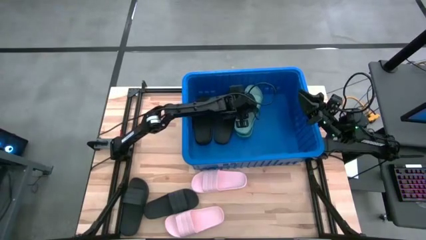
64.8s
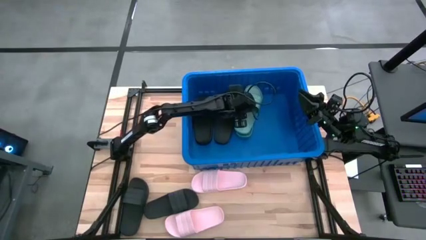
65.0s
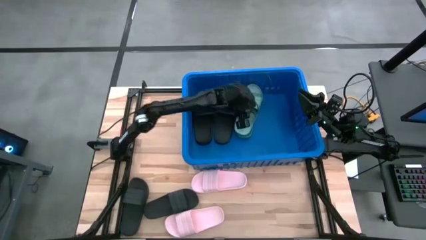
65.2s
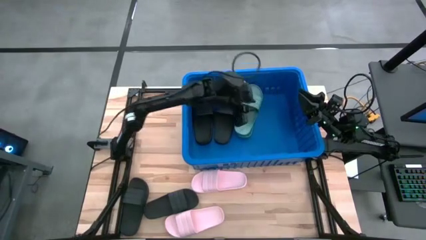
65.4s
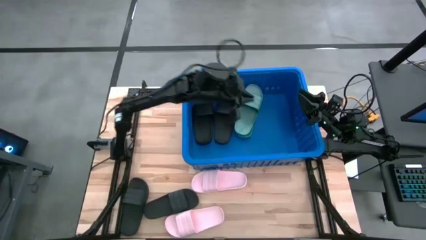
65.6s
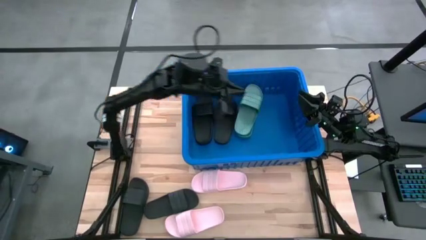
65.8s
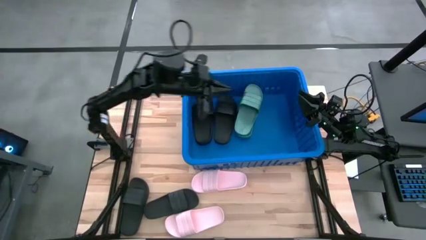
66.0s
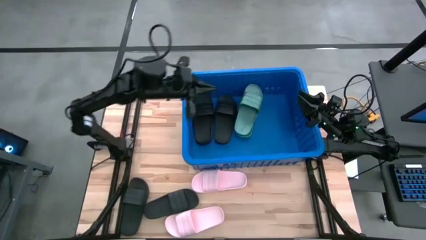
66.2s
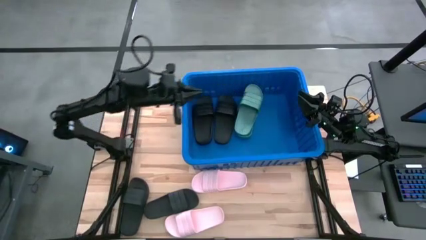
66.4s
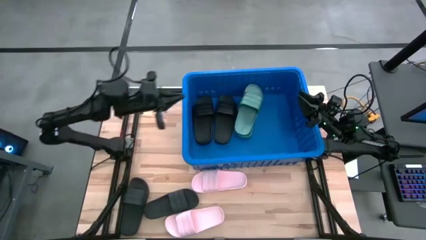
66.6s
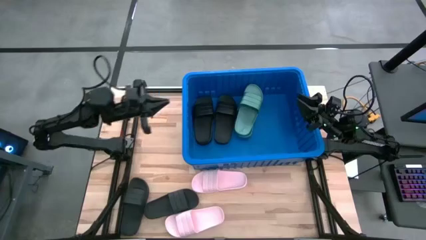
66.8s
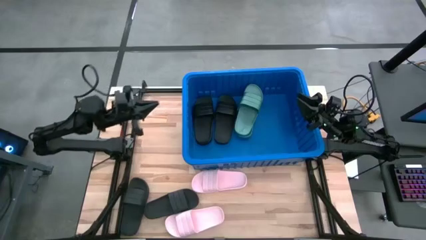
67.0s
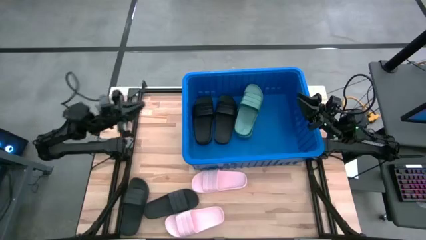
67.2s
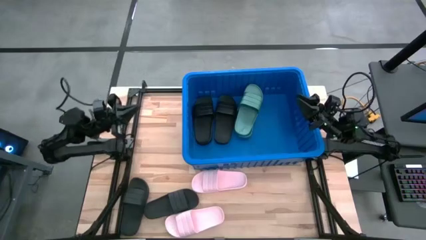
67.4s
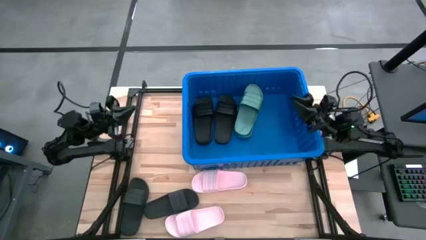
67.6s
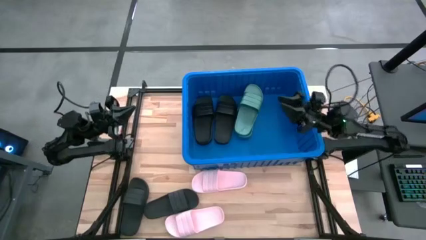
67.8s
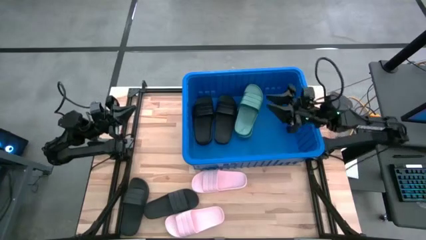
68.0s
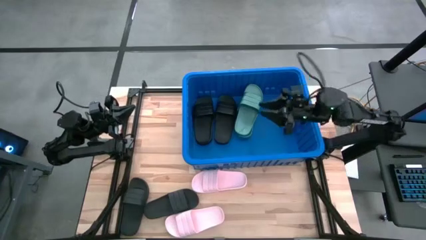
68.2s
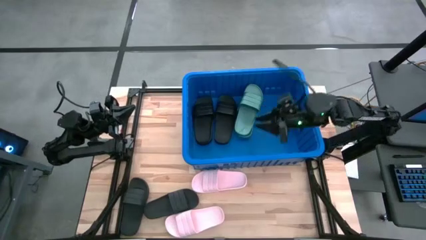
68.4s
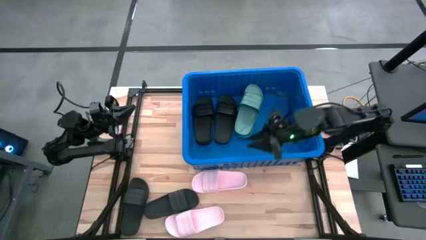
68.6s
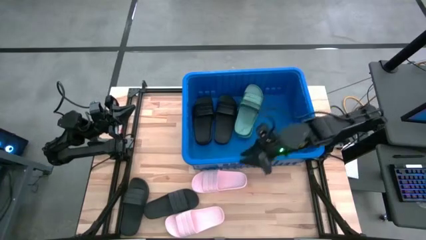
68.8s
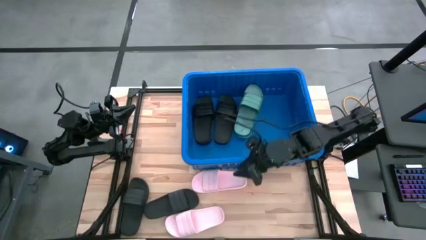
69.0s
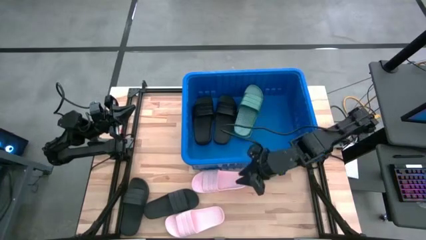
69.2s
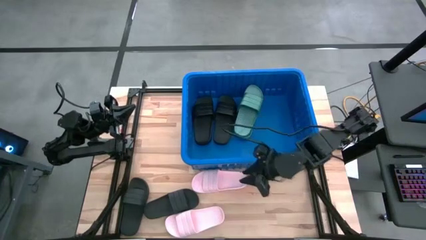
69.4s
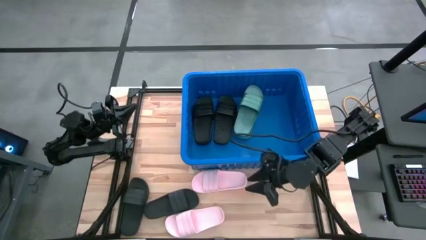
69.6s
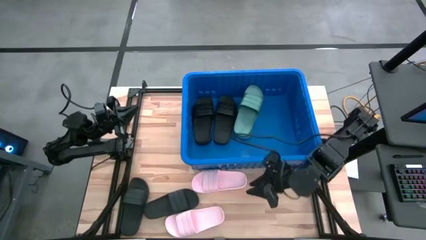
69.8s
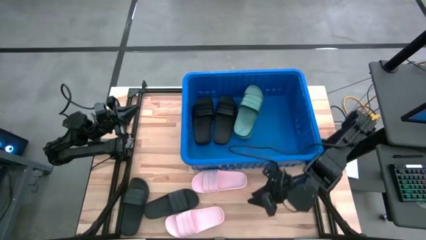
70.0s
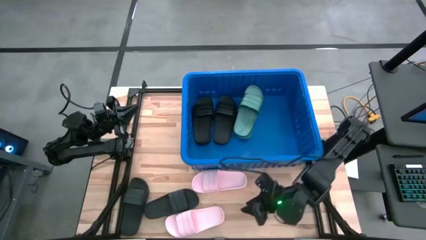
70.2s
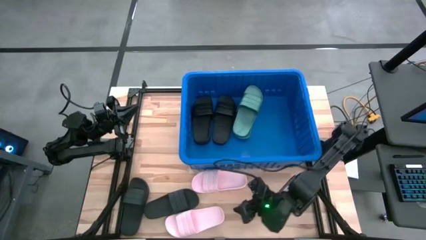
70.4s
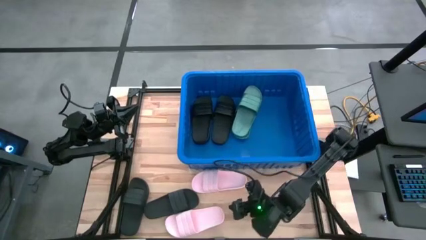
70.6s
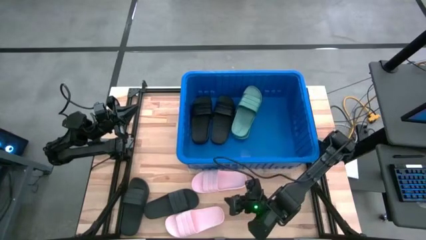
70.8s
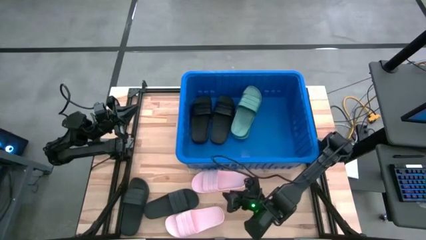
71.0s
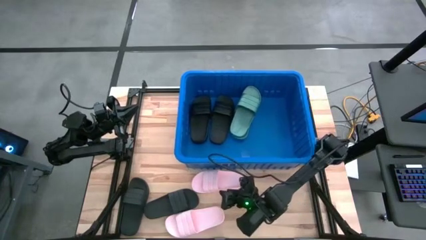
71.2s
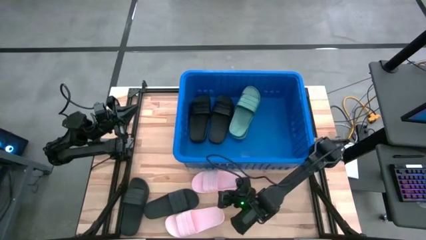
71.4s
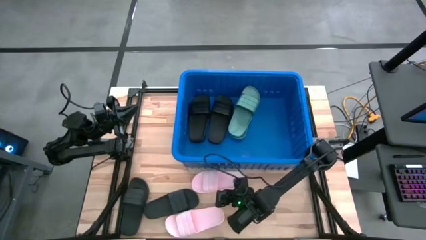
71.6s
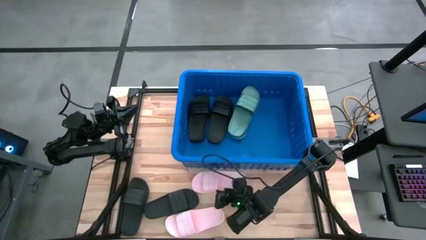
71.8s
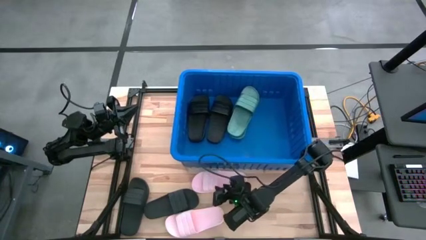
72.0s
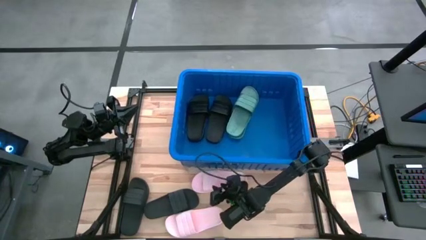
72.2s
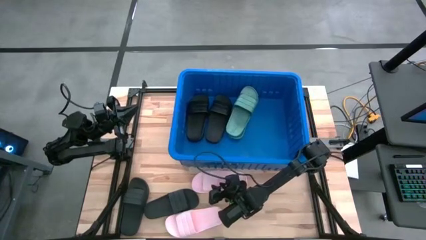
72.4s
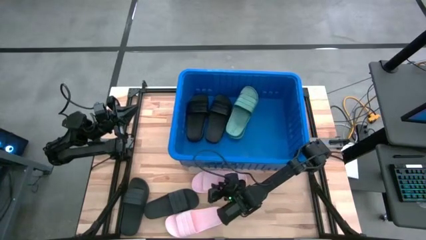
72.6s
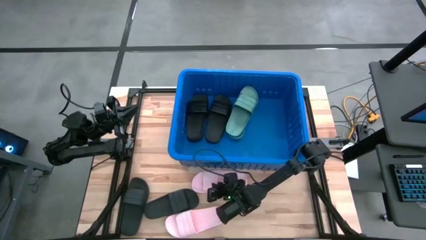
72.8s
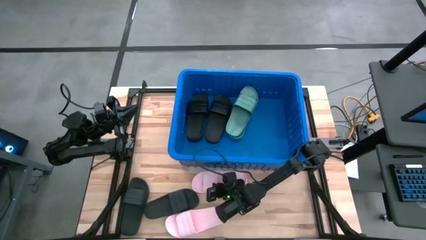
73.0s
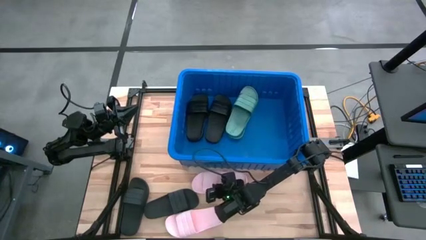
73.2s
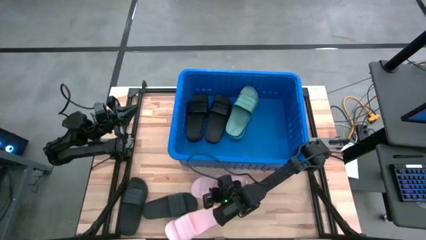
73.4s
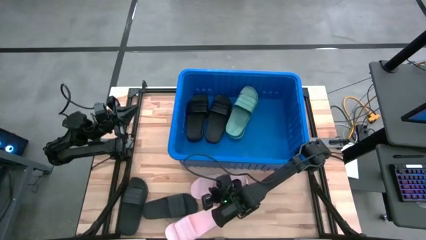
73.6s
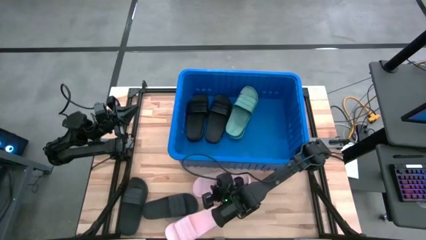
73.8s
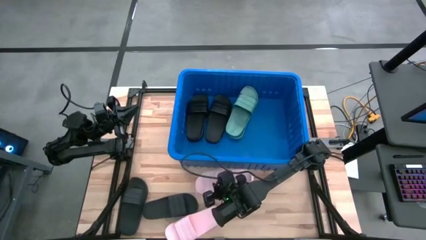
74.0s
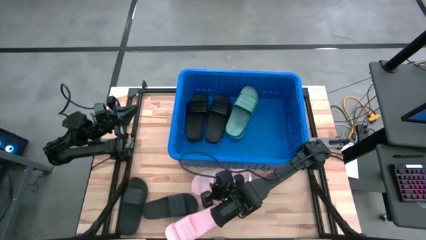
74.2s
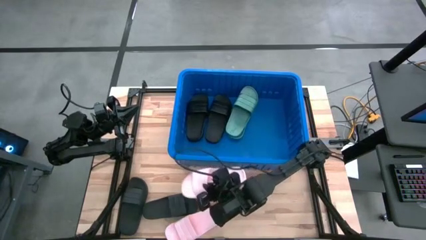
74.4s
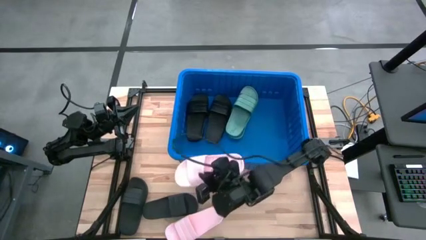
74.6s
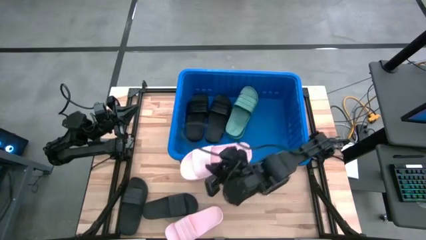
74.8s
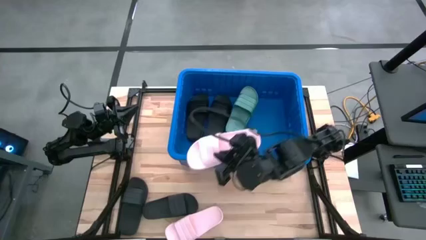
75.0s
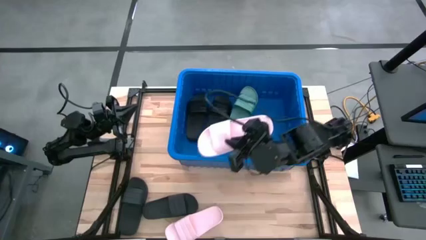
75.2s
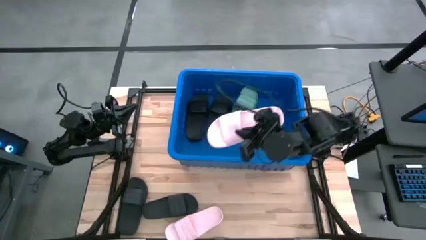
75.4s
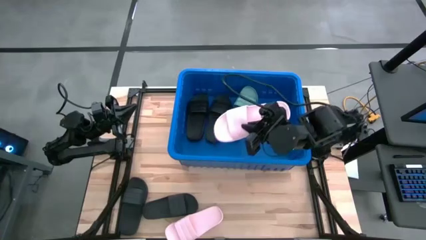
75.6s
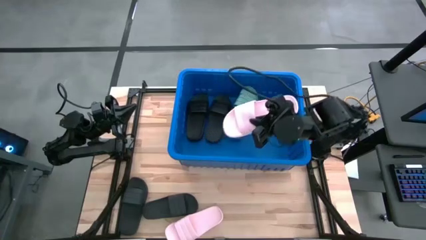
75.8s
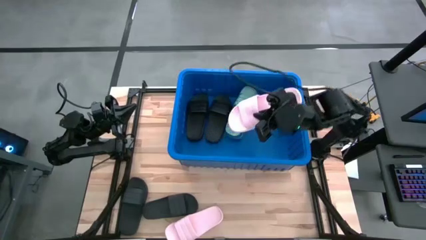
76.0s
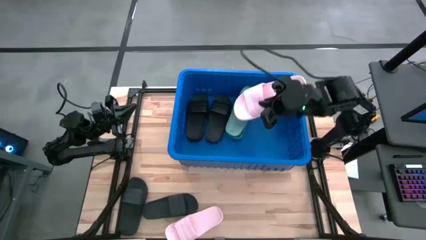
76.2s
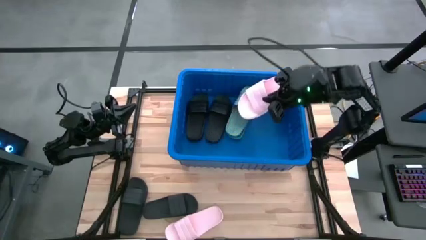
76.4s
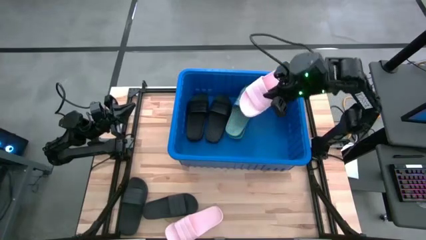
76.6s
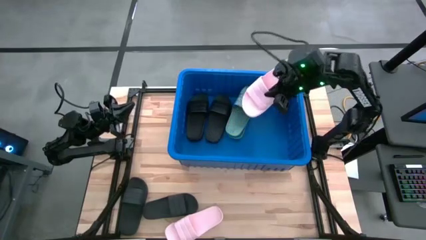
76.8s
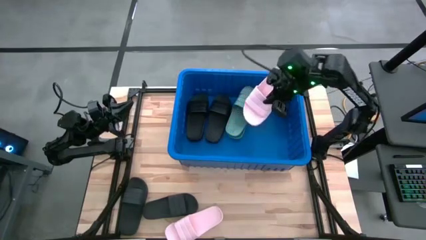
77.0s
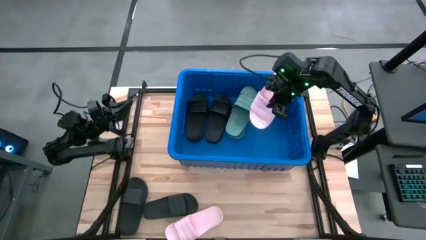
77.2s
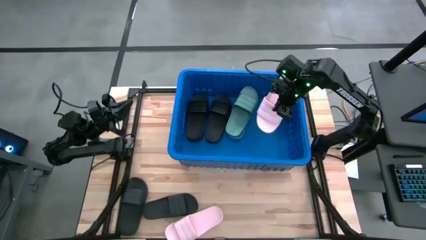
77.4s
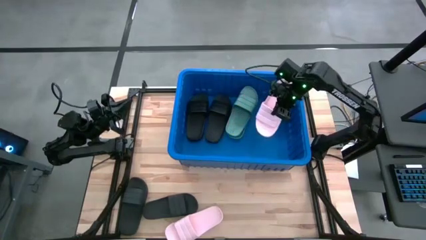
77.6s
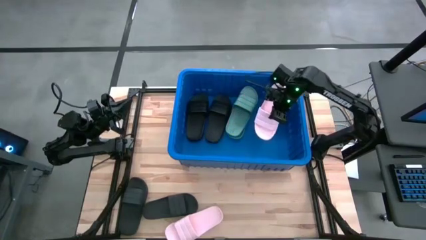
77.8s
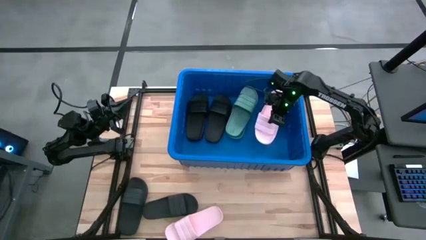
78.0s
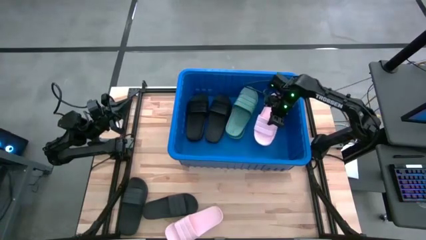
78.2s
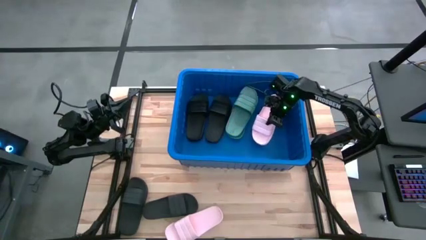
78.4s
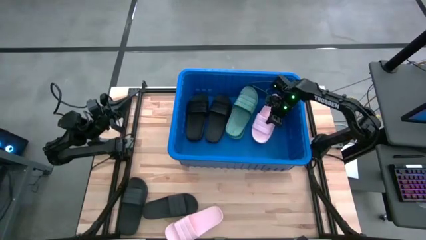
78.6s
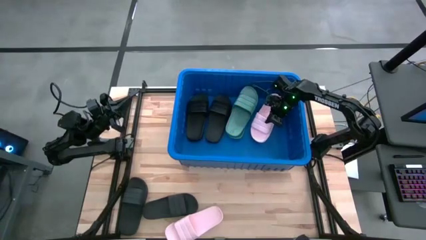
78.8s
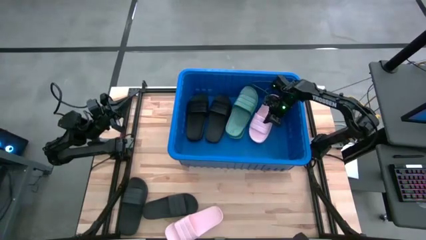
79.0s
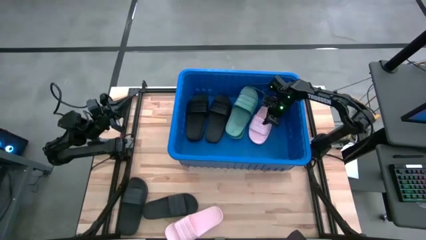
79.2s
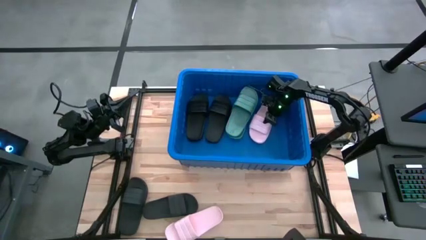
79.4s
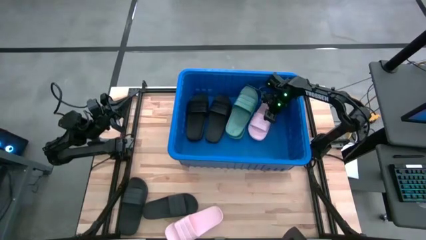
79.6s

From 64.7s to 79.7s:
Task: Pick and place slides into bin
Put the top pink slide into the blue bin
